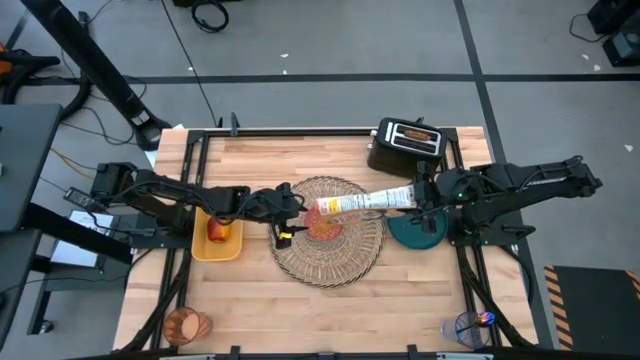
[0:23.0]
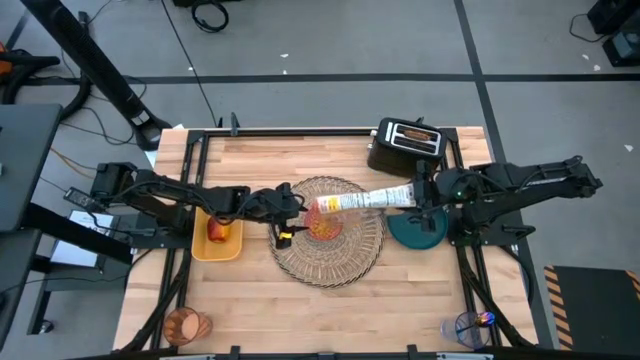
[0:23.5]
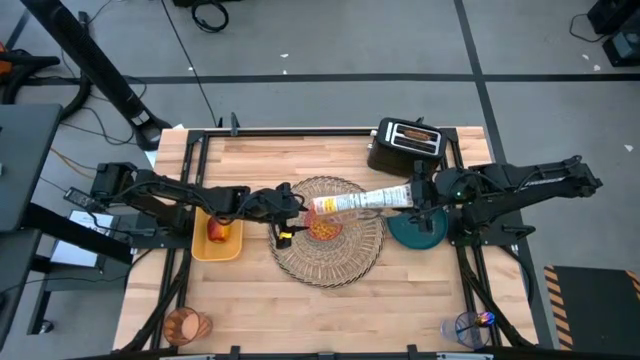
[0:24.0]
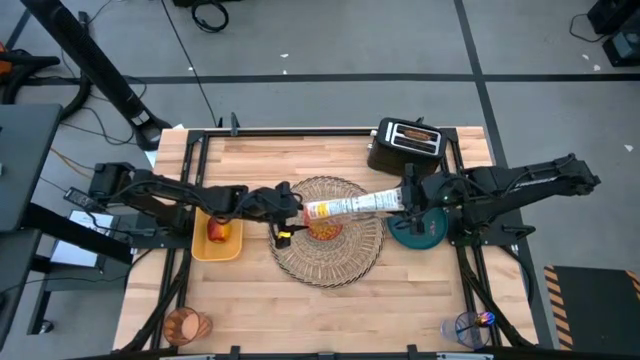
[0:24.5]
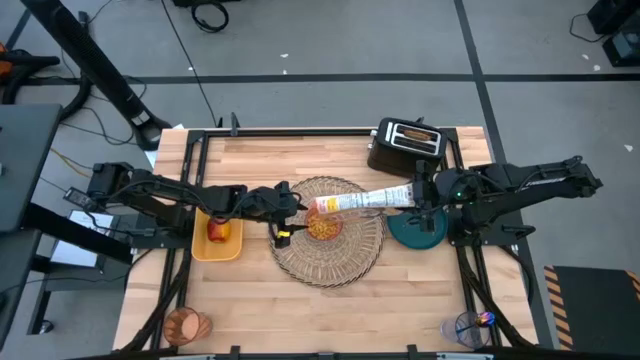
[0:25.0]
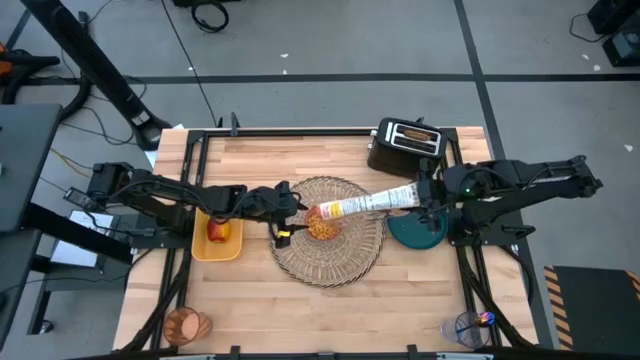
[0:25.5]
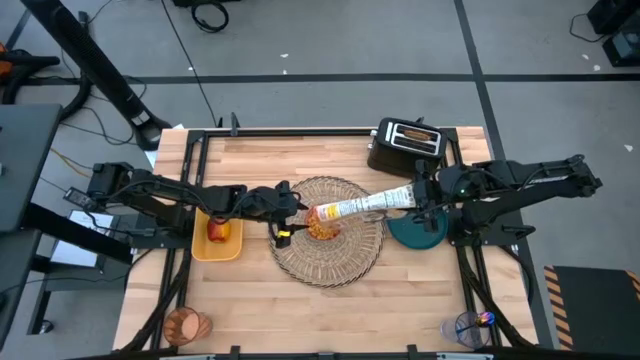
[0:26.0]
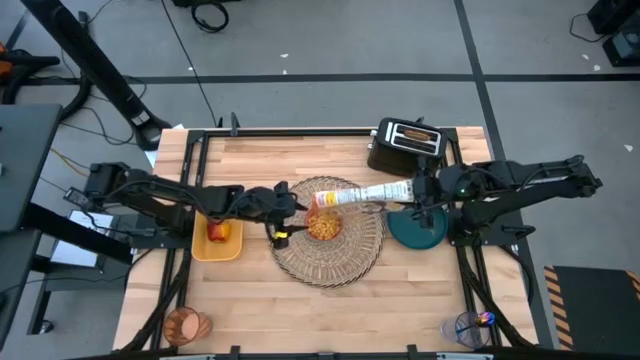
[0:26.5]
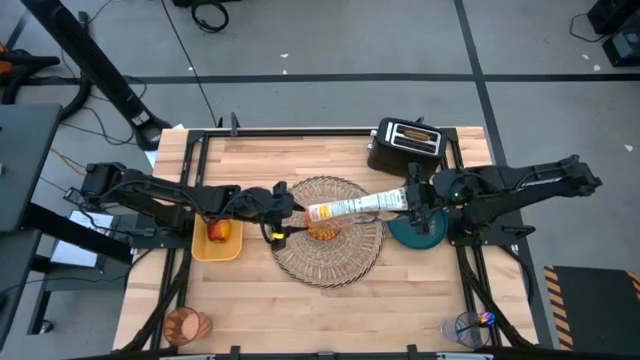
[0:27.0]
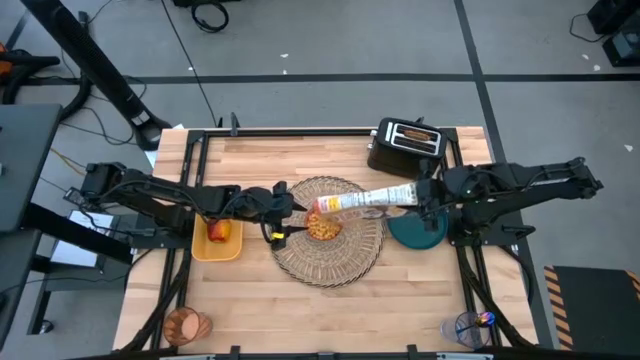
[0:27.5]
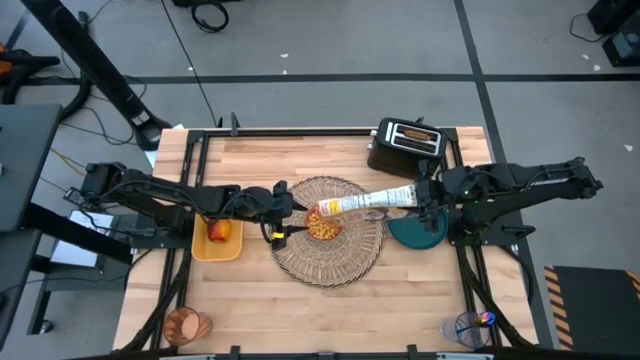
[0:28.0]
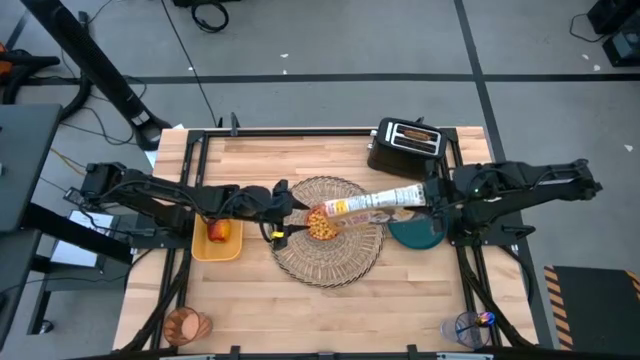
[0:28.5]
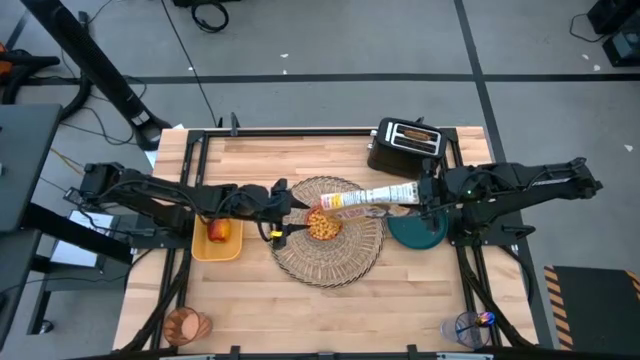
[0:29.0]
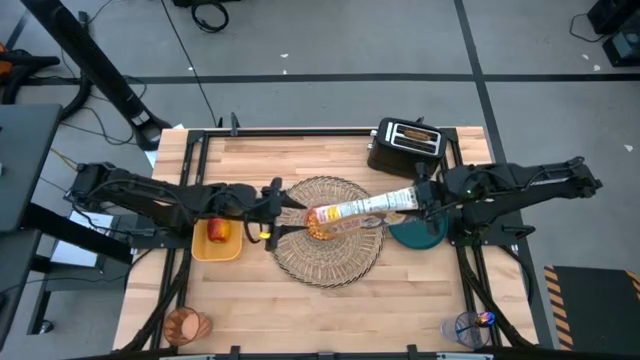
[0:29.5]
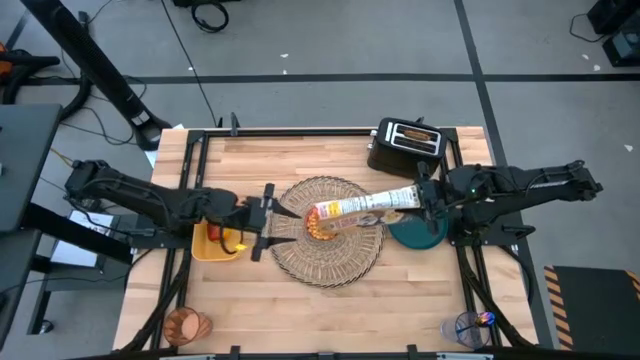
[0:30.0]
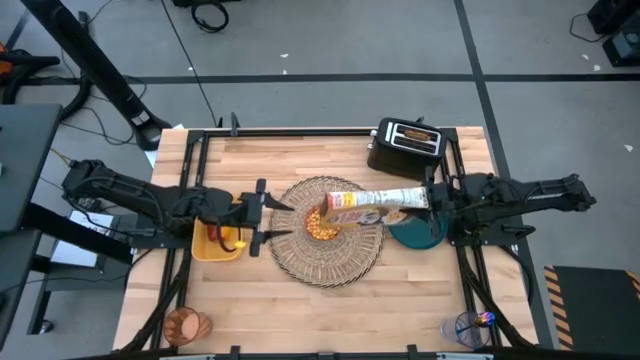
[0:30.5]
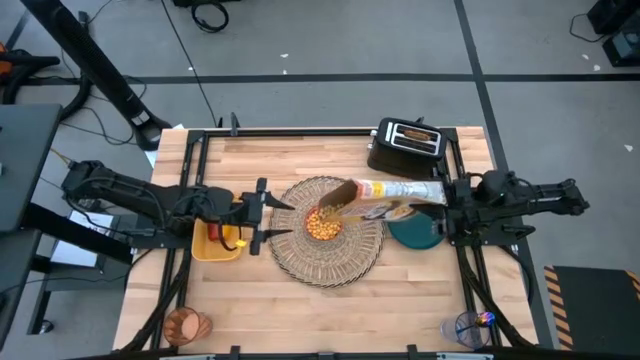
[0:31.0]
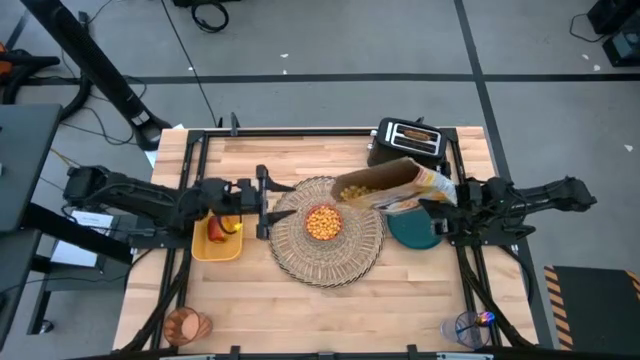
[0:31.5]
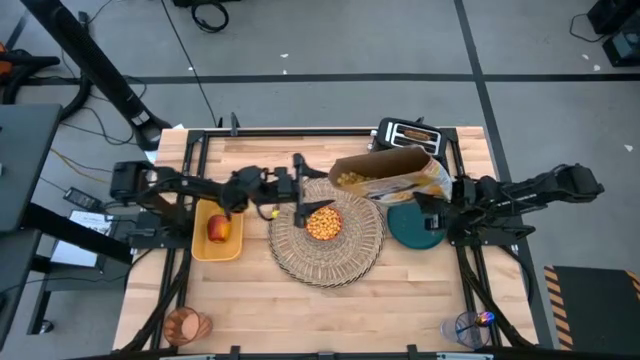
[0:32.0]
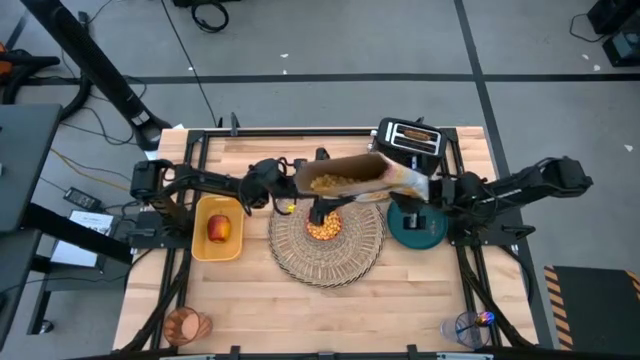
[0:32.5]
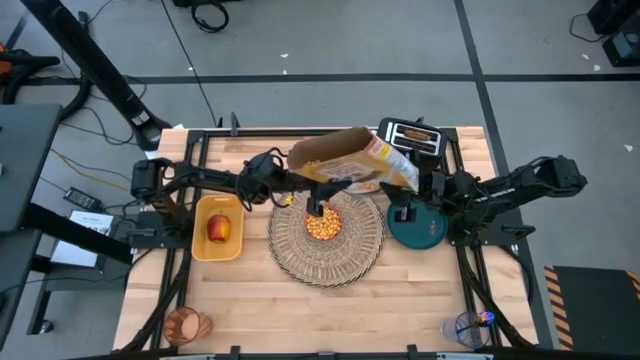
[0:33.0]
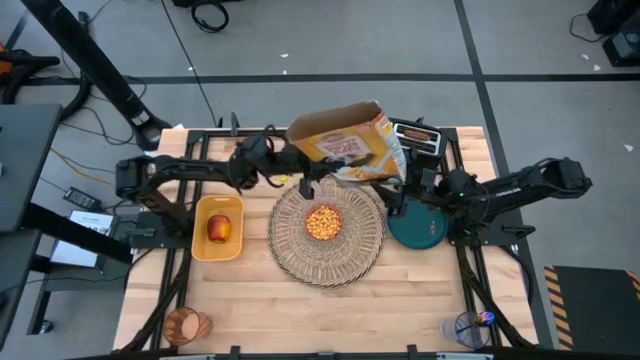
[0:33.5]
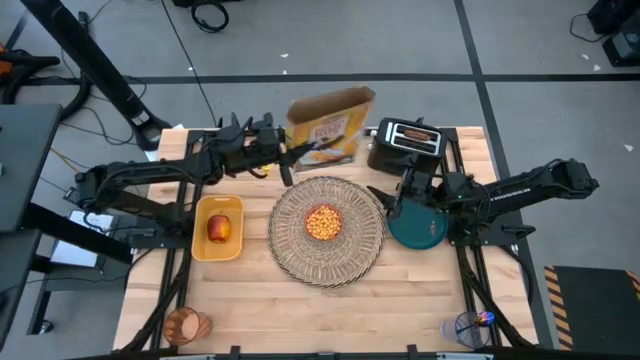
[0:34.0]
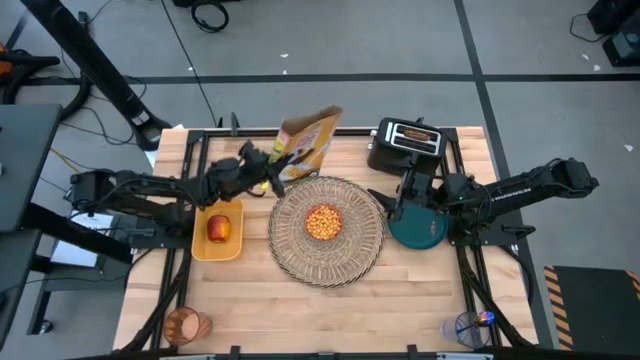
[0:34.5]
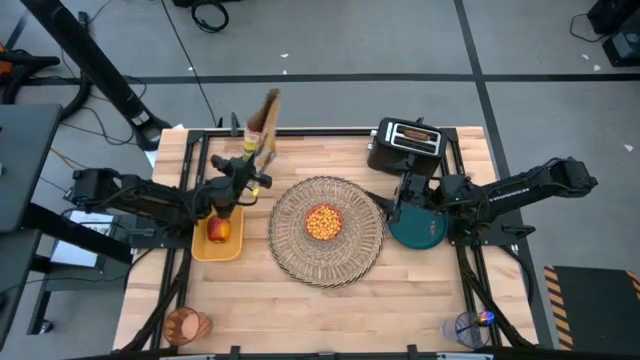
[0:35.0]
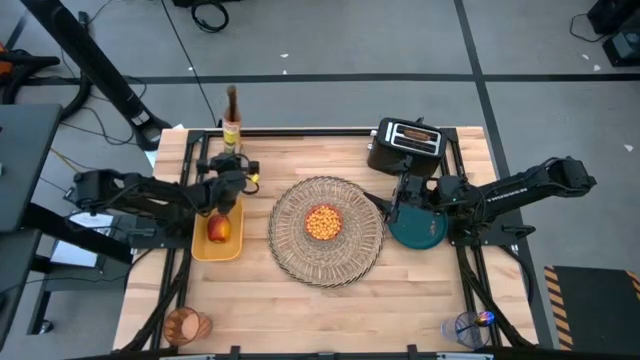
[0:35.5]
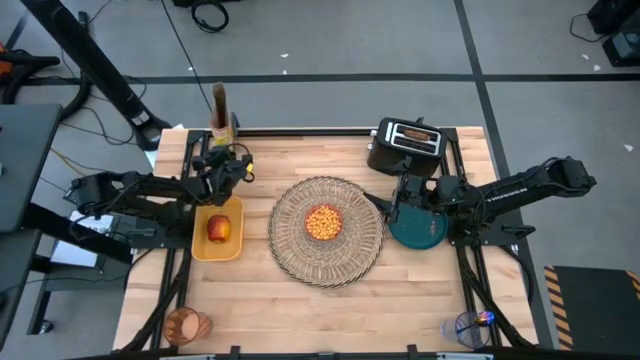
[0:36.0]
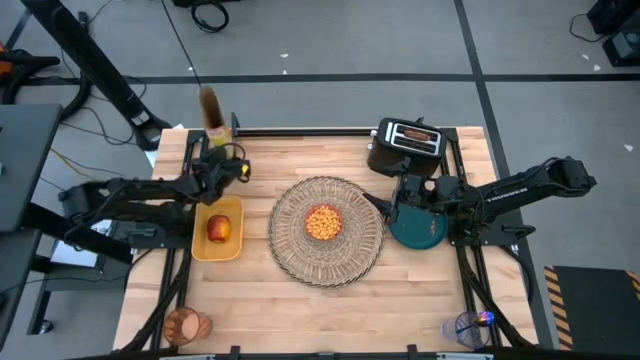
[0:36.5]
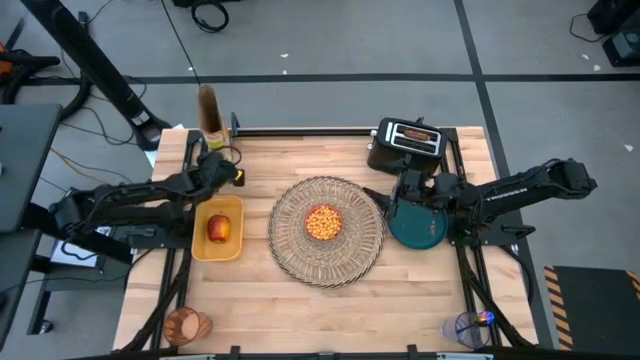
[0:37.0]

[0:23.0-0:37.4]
Task: Arrange a breakfast setting
Pour the cereal from the yellow cereal box into the red bowl on the brown table mat

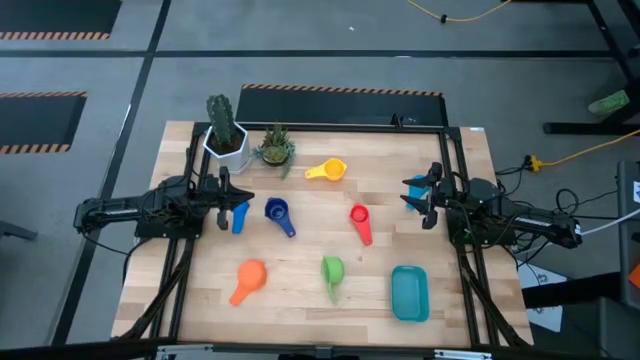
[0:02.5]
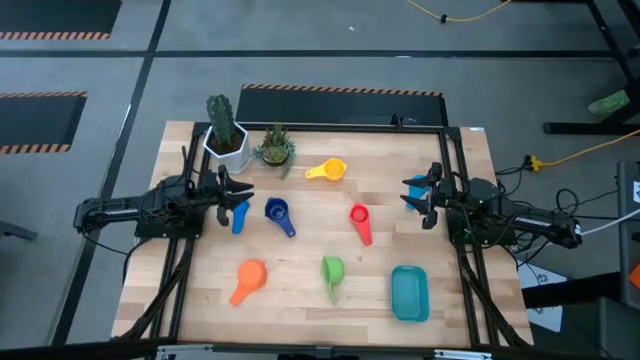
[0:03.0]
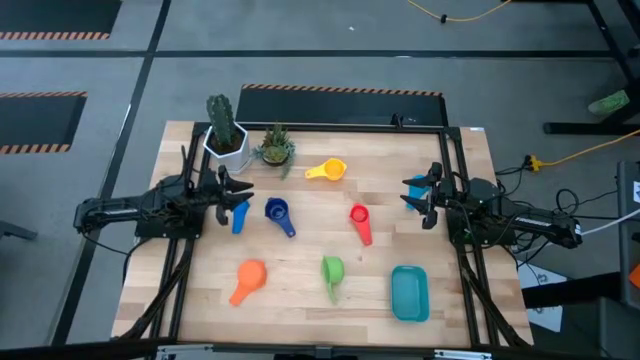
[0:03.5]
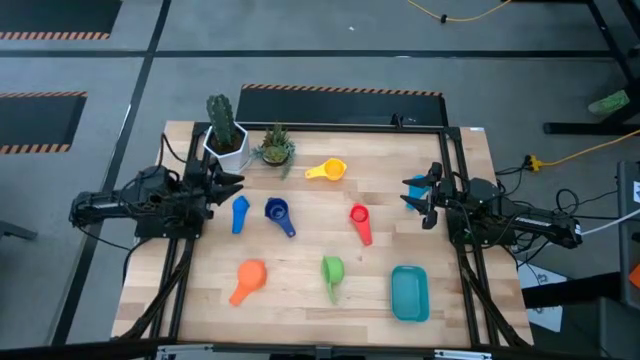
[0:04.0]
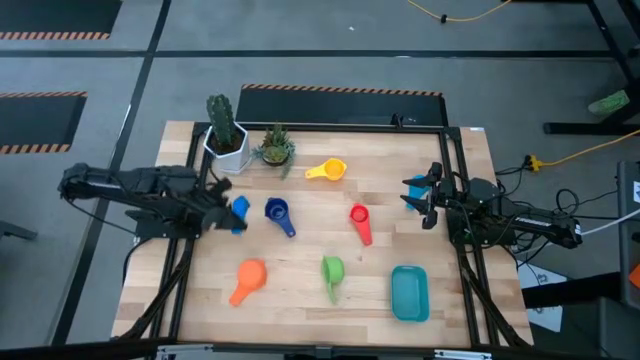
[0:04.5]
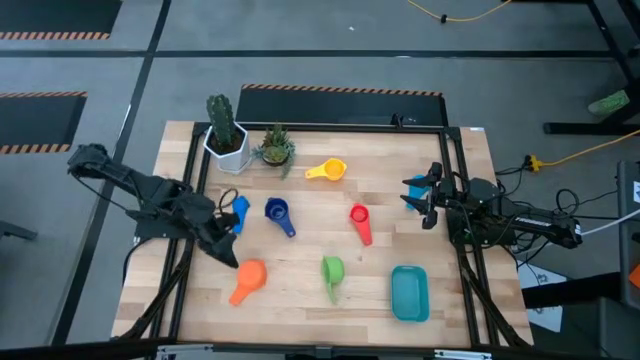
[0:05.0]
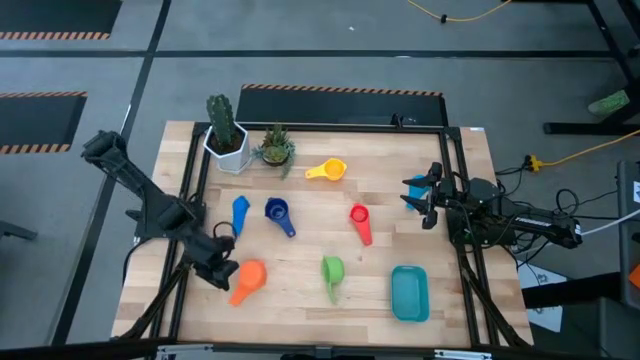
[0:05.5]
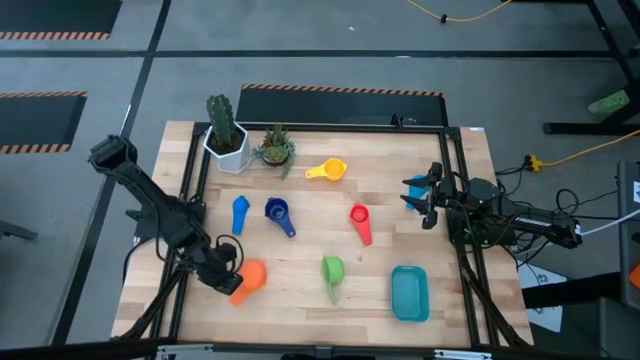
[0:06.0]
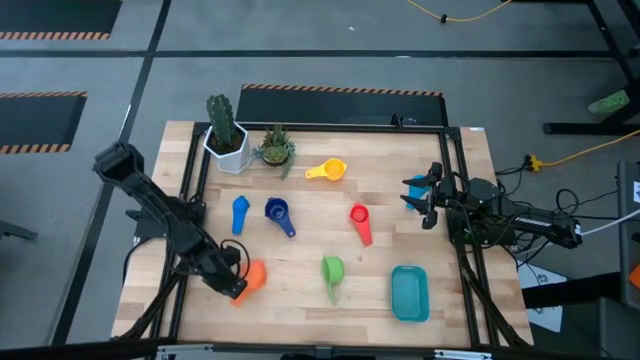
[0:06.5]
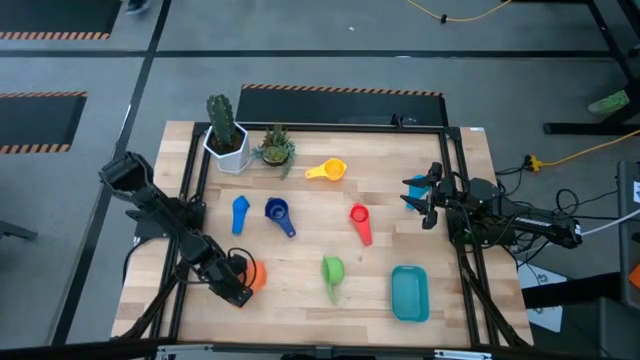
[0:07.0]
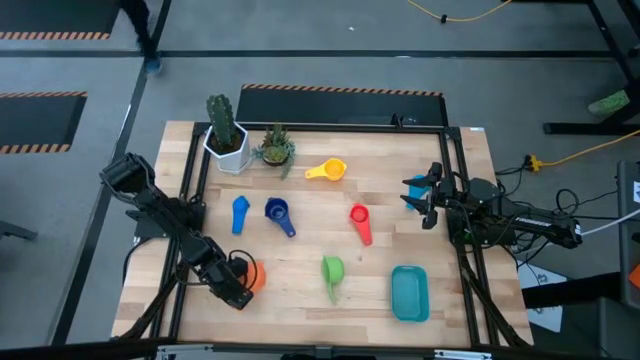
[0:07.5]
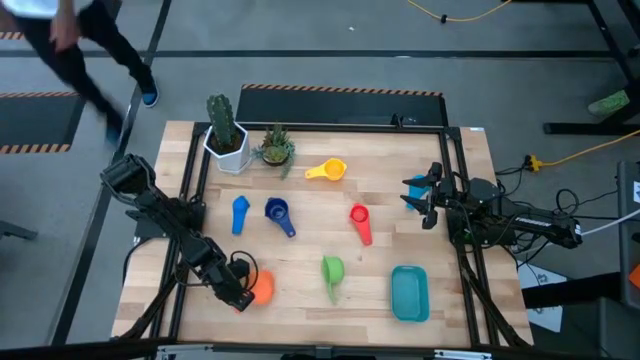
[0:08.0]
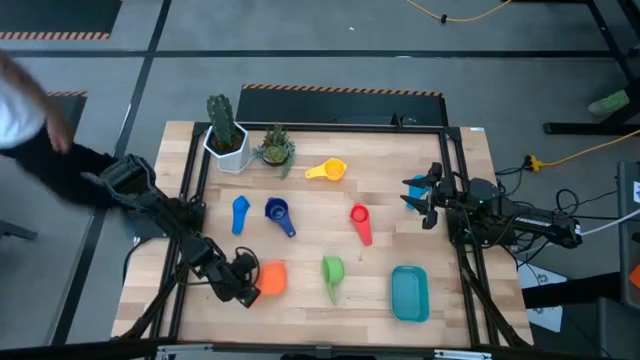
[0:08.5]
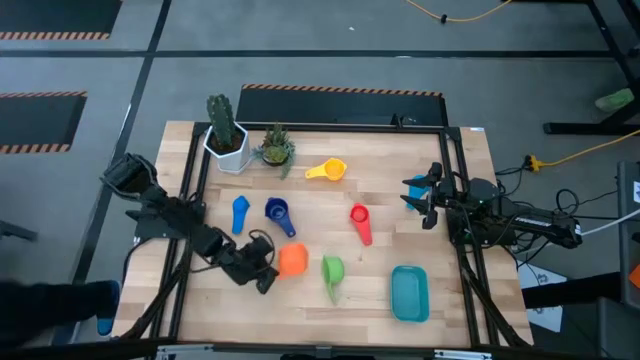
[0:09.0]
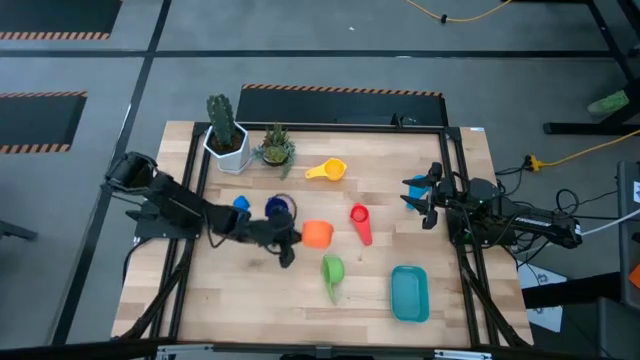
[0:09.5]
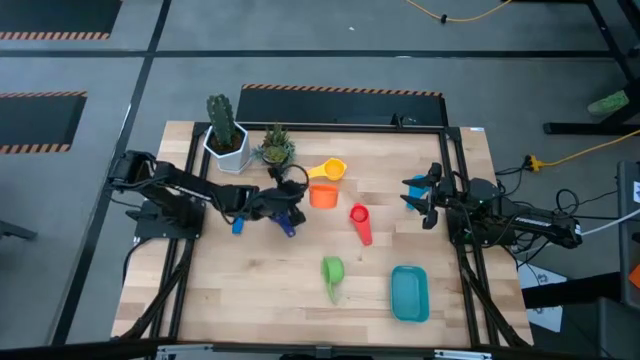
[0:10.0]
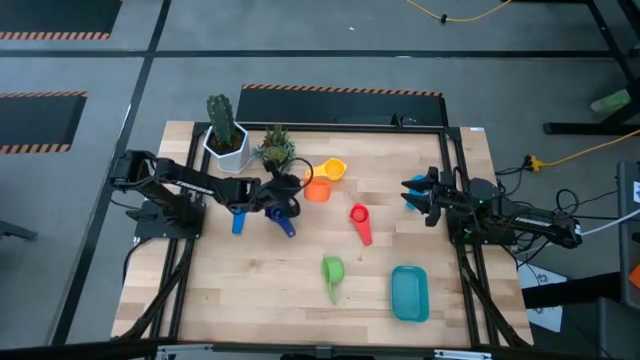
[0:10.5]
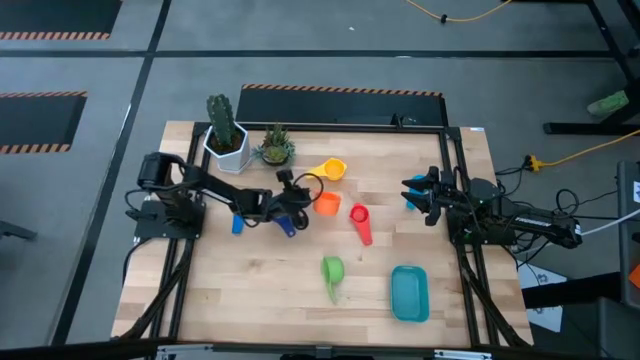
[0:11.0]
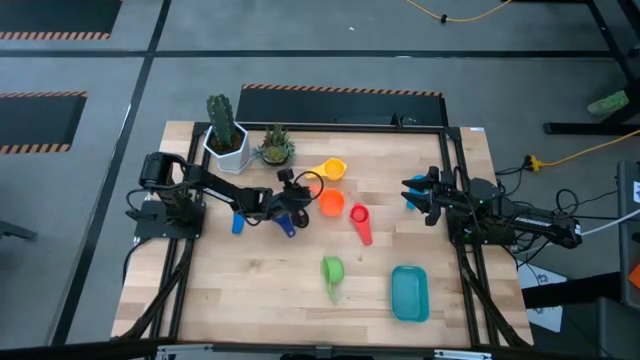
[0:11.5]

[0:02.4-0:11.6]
Task: Nest measuring cups in basket
Move the orange measuring cup to the center of the table
